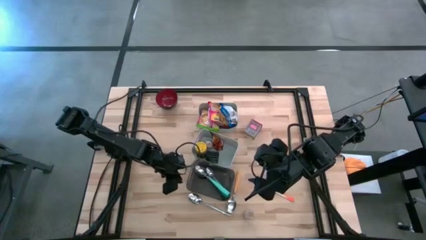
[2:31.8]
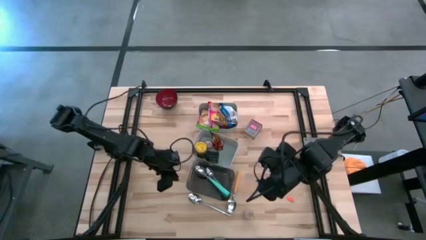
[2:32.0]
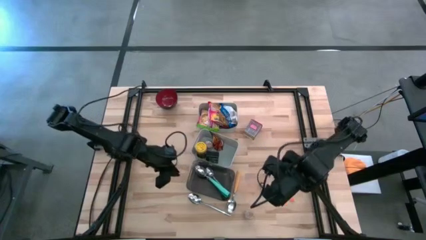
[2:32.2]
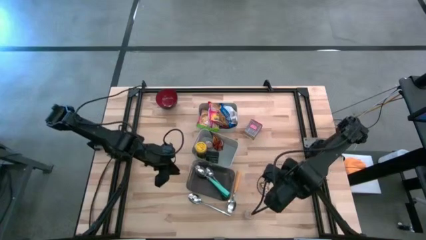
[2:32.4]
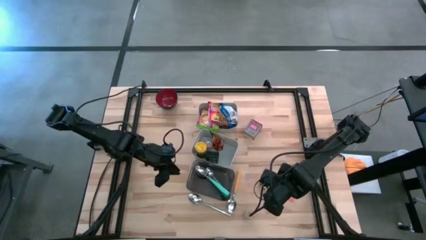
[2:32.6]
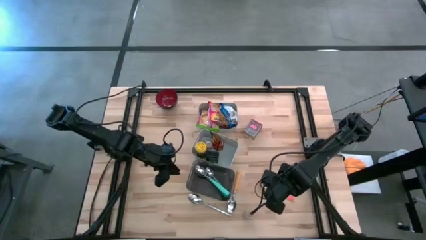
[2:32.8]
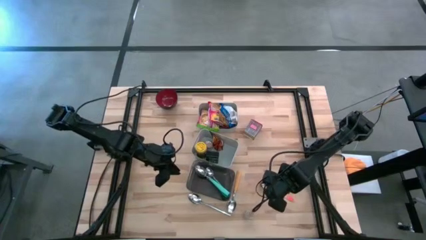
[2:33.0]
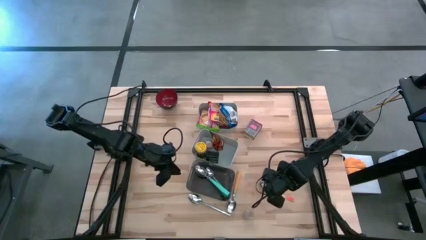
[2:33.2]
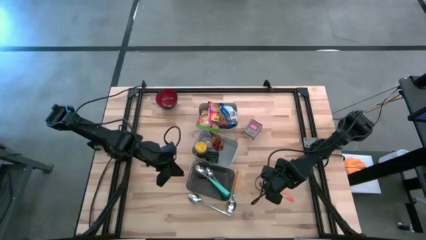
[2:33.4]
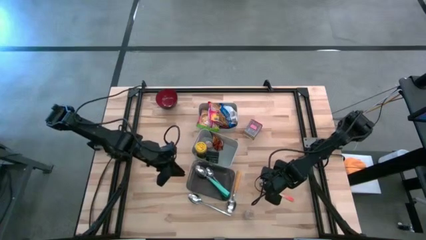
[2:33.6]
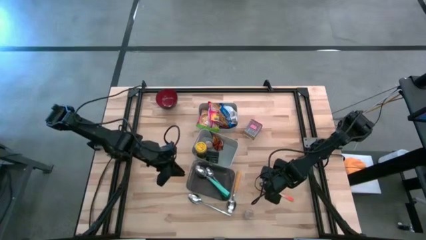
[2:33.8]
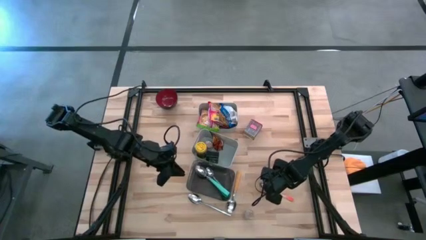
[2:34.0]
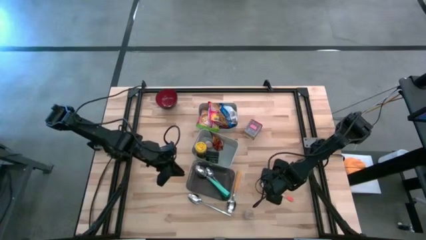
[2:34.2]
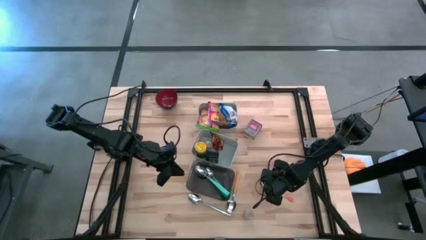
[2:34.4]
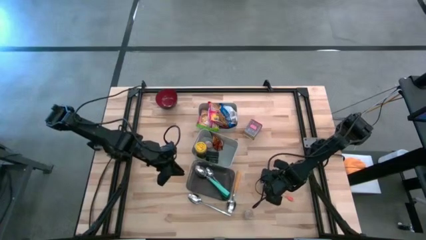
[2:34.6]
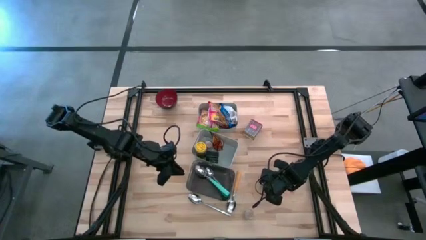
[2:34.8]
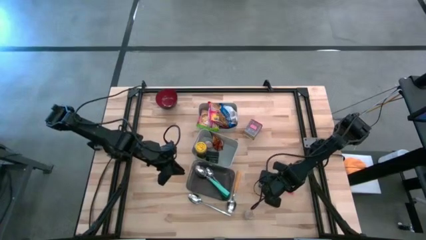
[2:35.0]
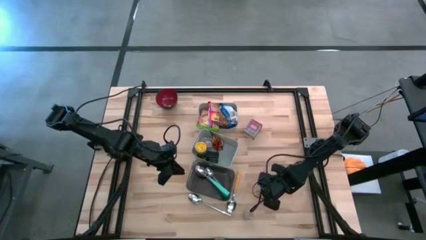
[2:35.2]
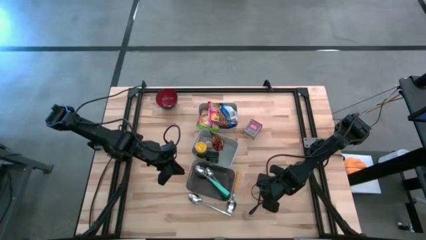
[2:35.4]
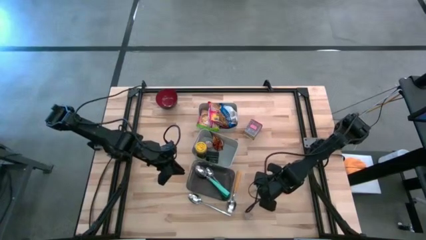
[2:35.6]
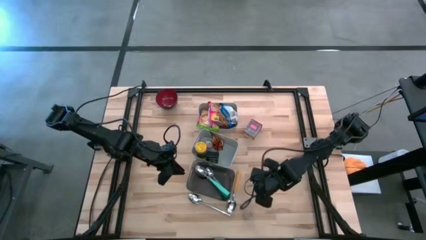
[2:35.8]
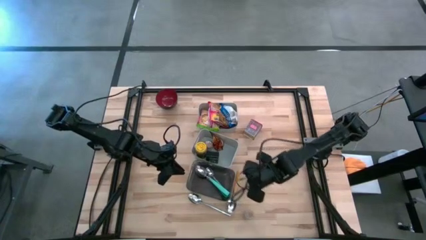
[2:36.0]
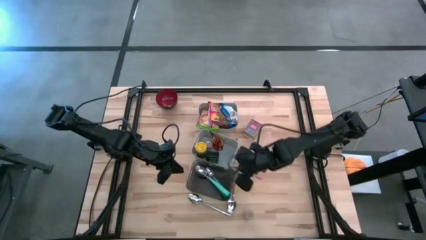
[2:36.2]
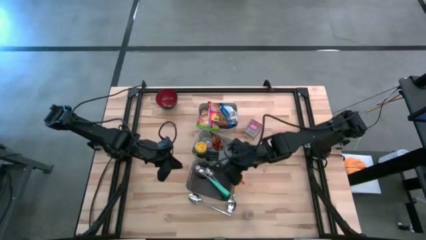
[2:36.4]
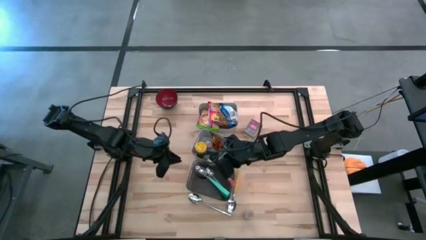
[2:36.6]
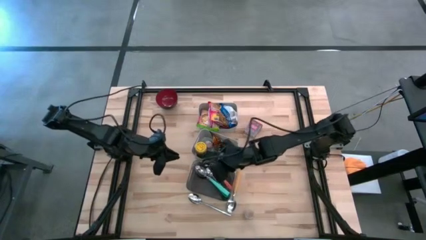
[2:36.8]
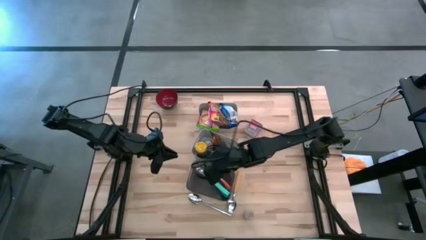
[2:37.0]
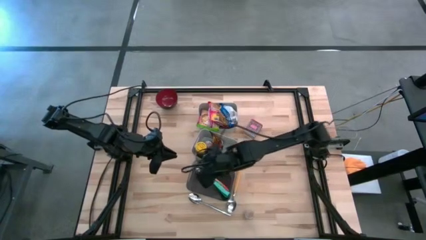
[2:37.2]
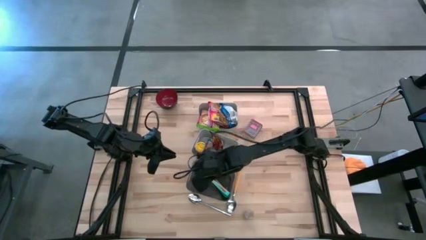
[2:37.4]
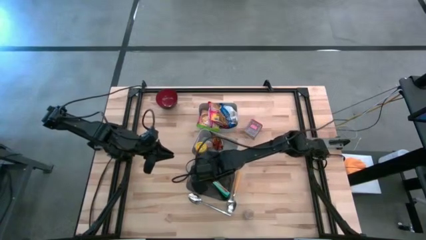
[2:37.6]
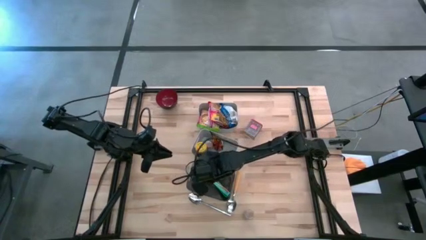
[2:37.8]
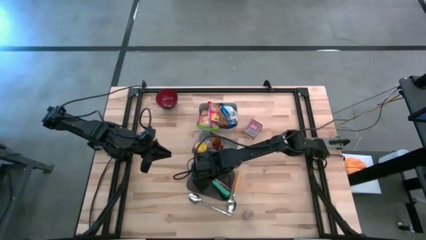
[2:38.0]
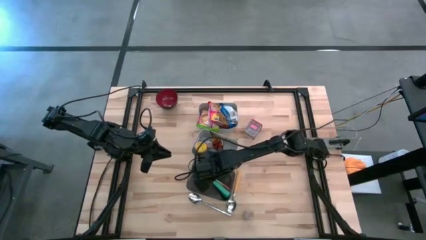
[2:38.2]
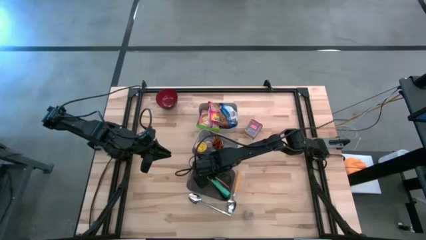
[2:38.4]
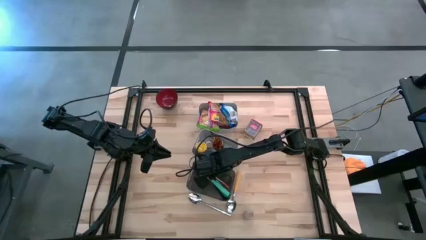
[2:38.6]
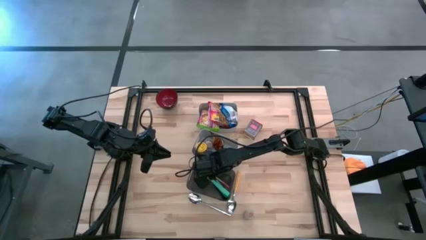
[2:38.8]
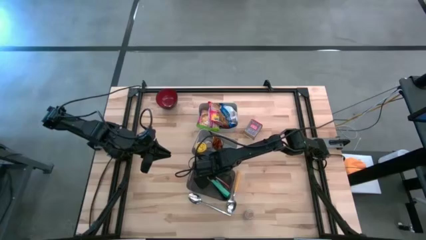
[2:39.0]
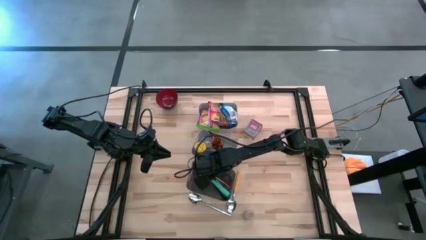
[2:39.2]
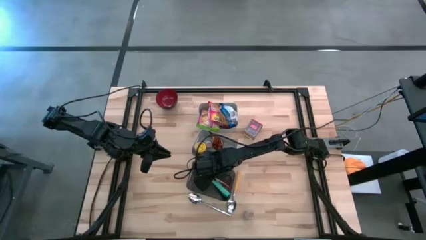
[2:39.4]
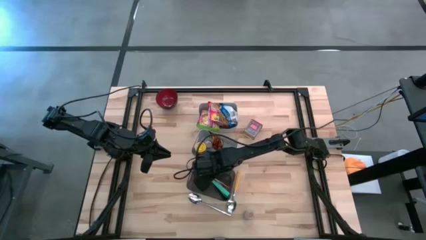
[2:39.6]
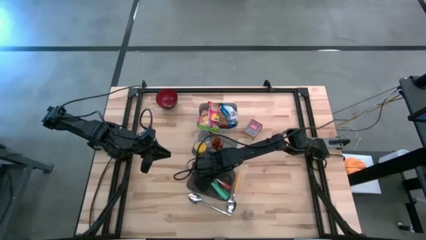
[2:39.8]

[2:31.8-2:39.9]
Put the orange spoon into the black bin

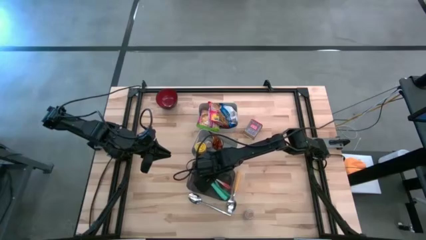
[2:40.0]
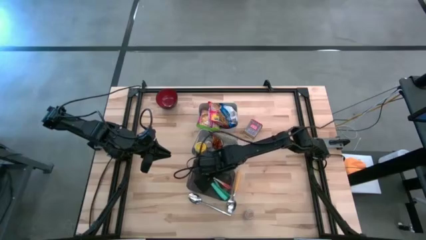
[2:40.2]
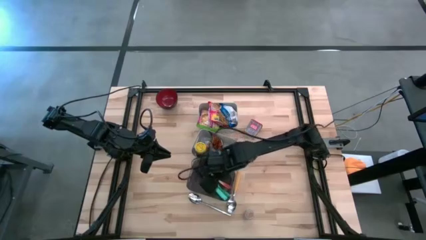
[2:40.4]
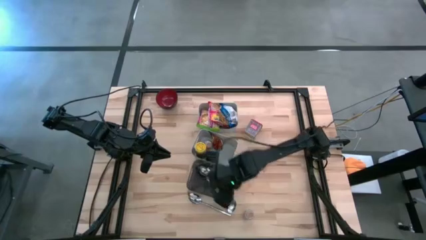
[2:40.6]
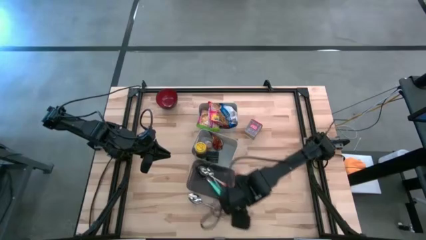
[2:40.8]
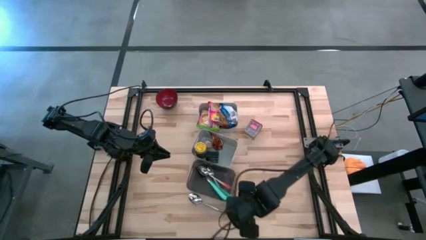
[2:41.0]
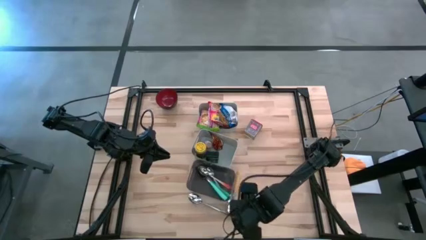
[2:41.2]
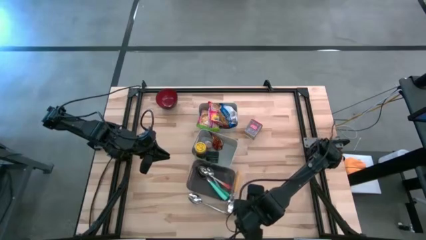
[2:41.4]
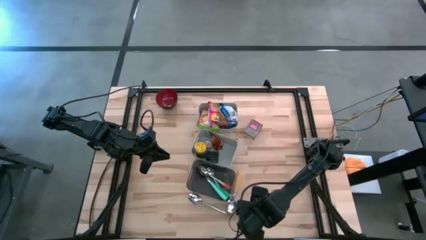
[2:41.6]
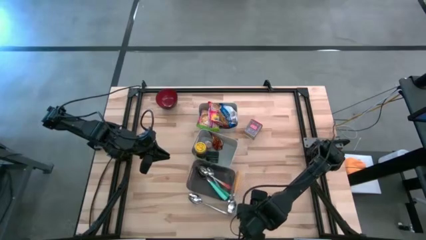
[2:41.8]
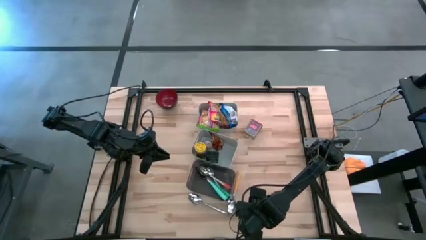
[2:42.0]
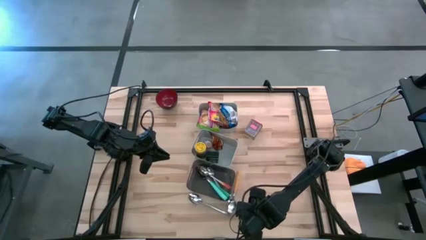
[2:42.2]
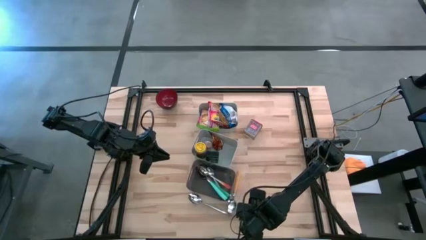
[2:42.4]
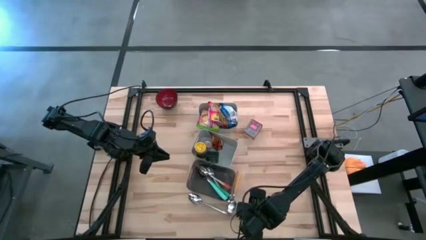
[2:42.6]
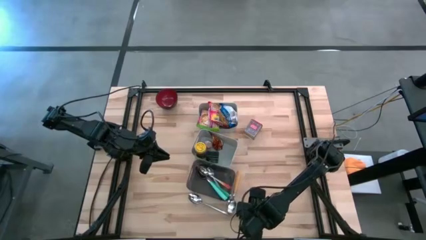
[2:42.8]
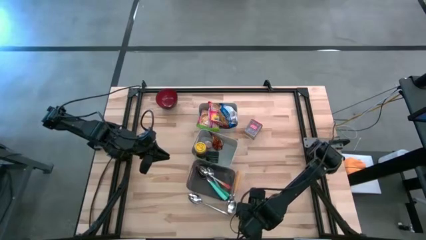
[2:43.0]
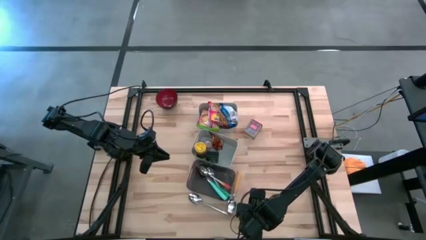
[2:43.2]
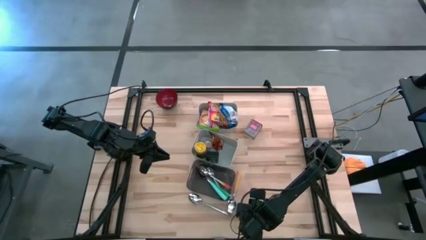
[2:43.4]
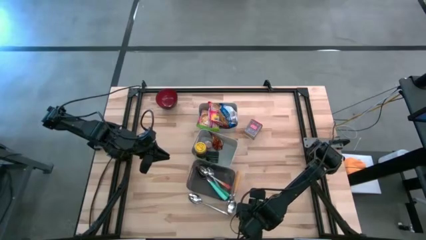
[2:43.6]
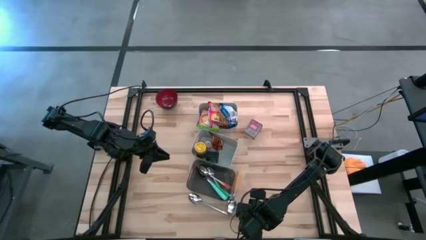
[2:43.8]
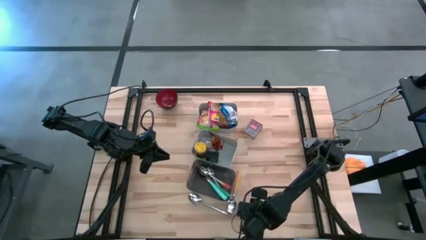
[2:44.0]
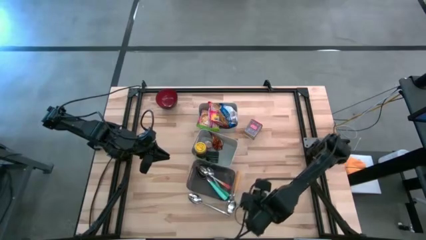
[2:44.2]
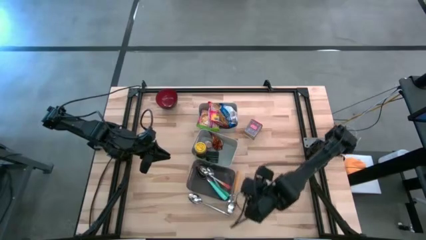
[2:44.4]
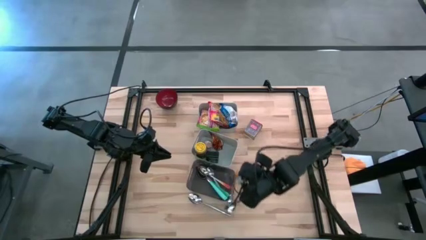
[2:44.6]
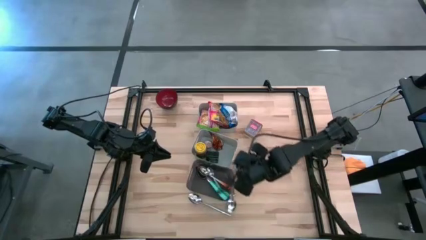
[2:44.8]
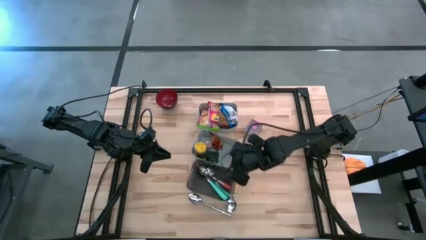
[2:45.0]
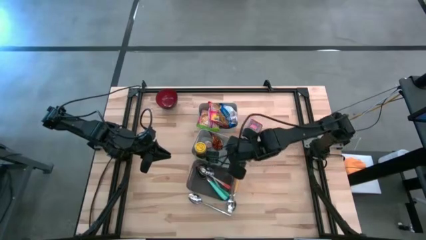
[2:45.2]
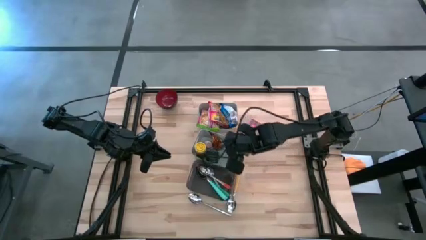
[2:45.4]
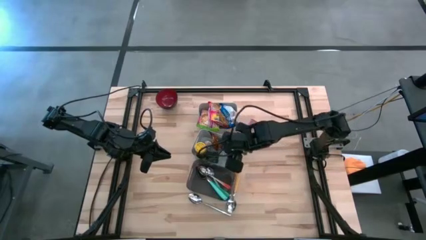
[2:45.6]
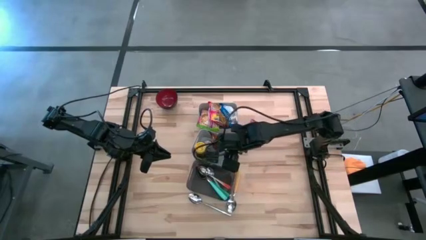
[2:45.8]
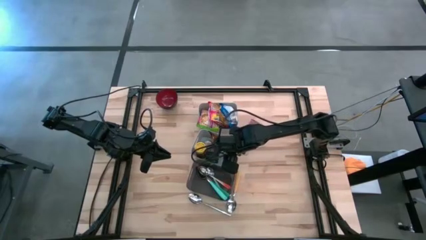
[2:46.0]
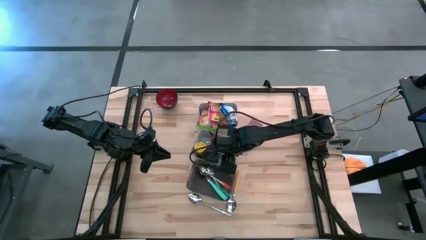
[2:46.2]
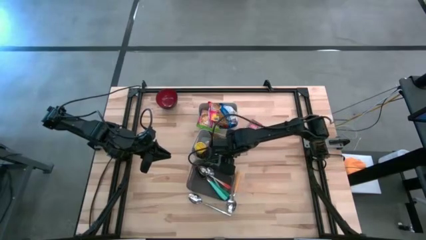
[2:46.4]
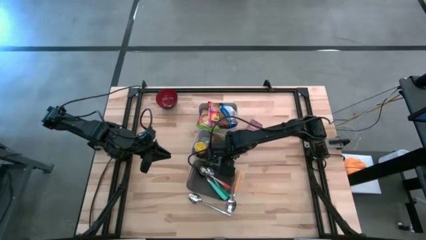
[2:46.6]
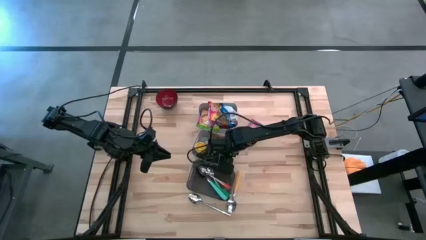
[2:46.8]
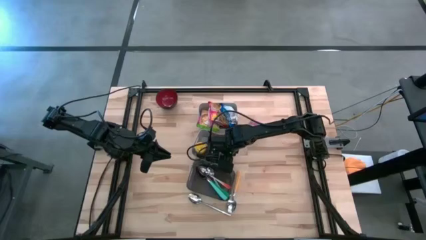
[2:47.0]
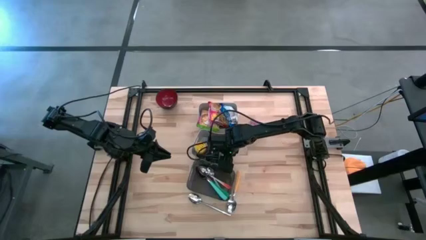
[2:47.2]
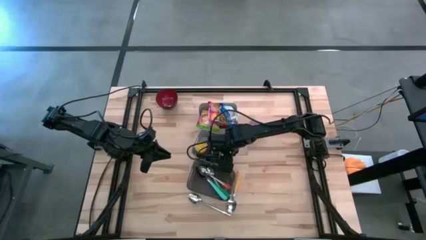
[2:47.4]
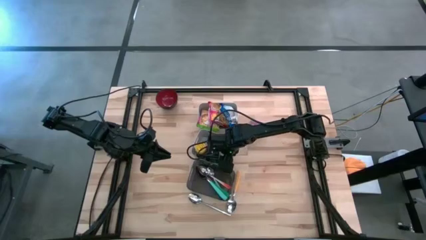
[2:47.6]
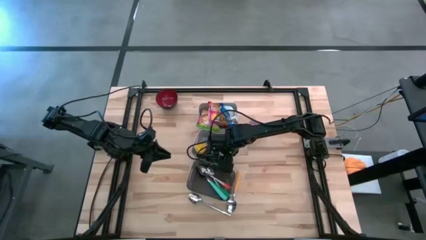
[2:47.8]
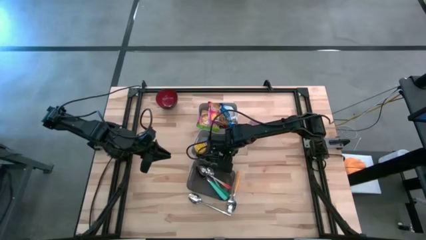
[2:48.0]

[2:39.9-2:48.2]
Put the brown seasoning bottle into the bottom gray bin
